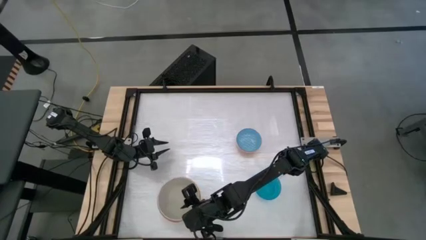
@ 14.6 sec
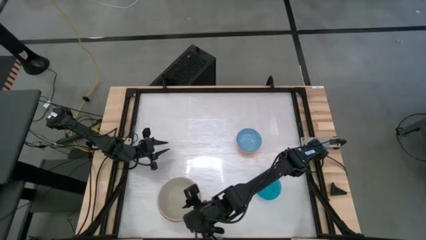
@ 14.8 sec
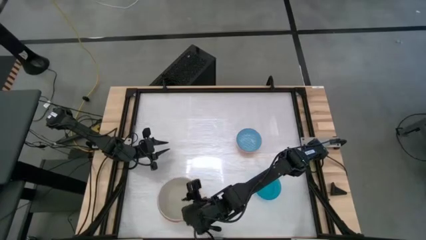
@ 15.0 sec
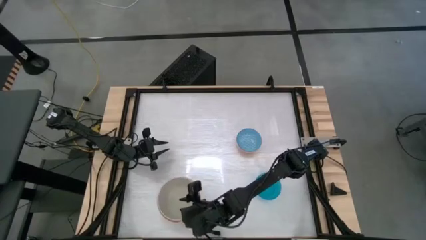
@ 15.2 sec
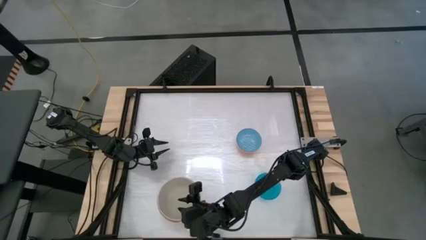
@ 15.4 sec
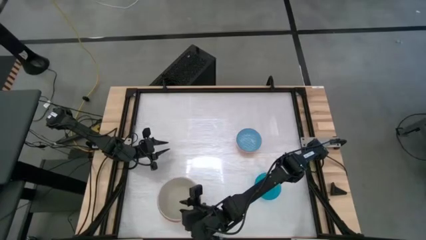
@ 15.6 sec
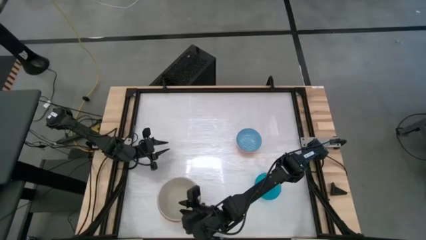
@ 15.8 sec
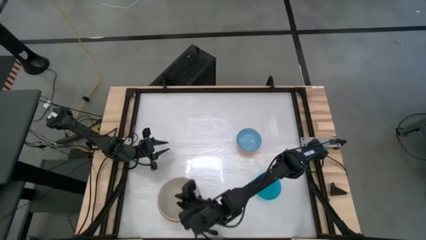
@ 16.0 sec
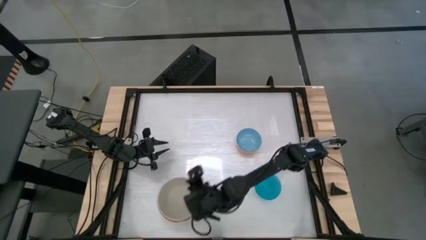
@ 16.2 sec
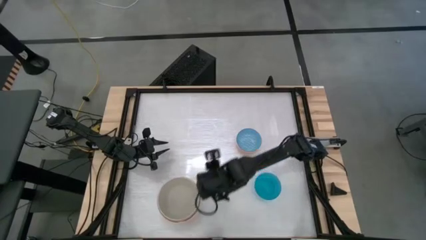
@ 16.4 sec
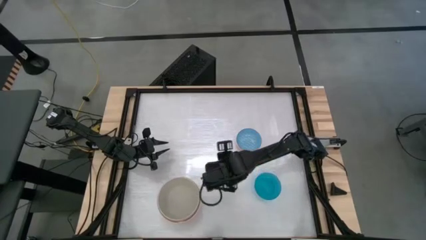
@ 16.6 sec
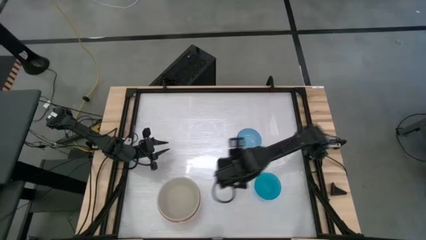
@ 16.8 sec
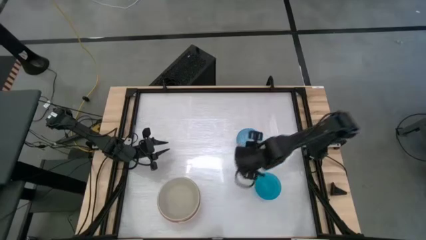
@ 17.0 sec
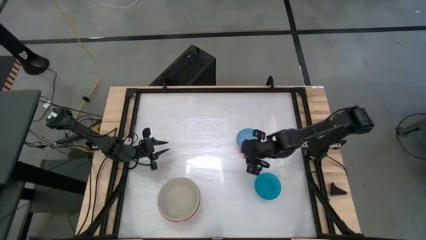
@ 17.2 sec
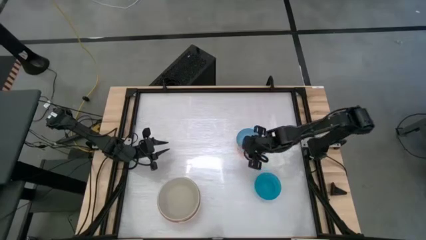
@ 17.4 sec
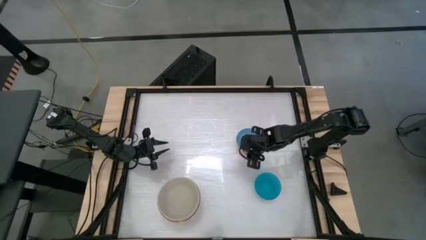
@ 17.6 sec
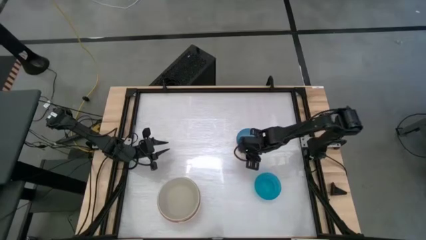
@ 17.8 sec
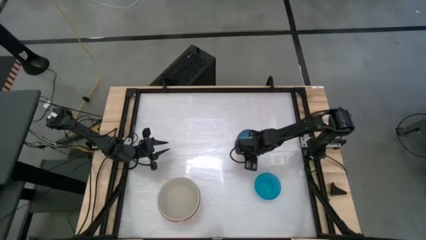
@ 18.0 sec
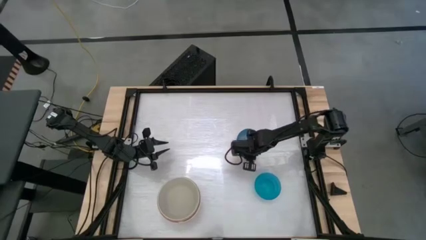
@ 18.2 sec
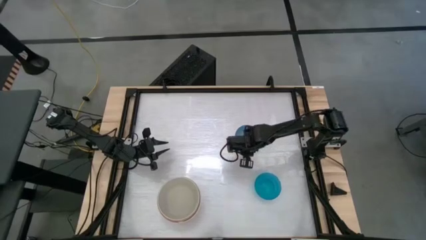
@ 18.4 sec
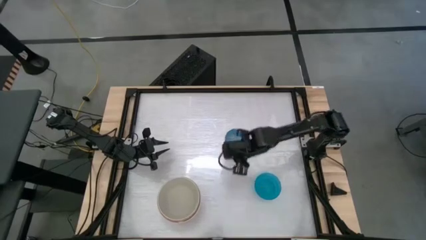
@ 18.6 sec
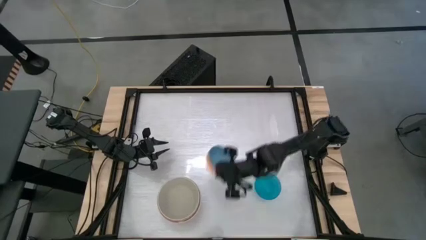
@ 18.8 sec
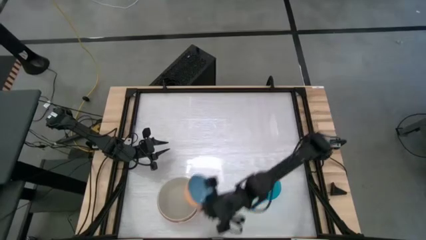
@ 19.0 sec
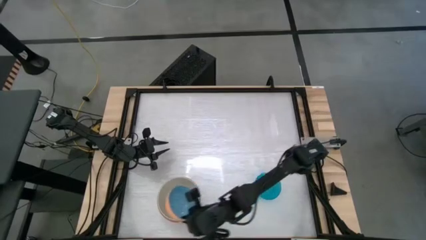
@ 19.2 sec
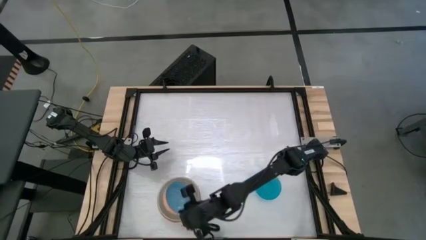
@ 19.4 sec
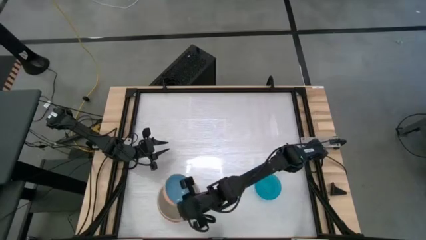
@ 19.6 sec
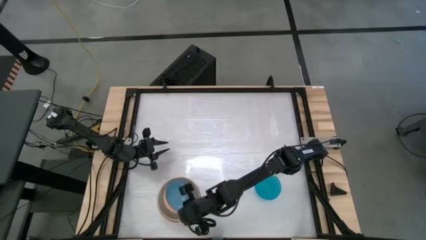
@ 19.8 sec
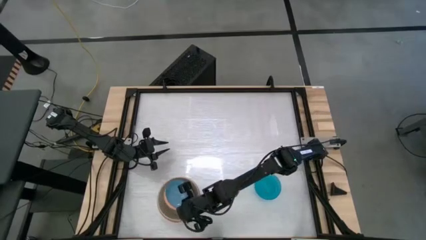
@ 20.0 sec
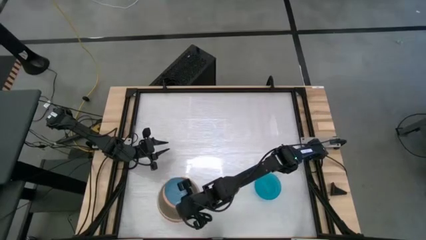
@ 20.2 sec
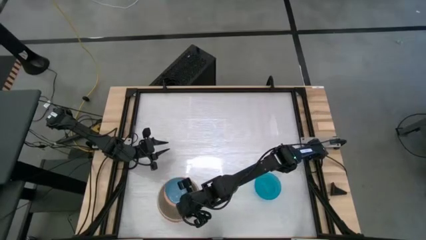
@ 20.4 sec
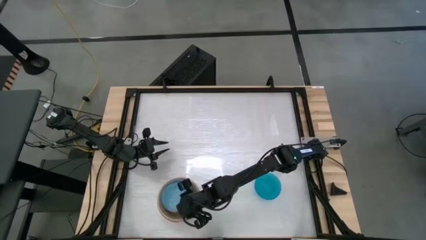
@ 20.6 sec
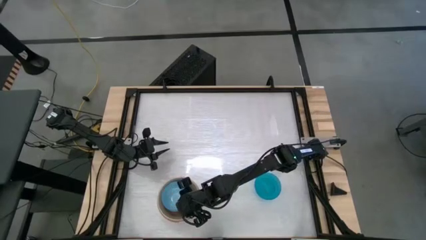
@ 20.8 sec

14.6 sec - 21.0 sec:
Stack the orange bowl on top of the gray bowl

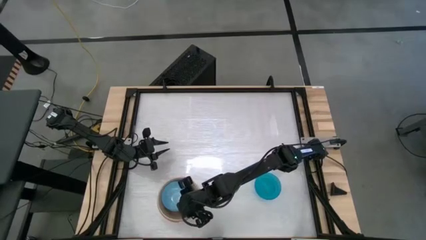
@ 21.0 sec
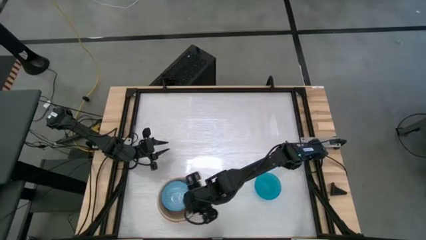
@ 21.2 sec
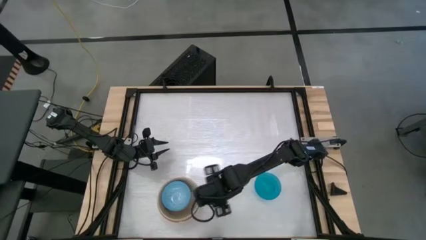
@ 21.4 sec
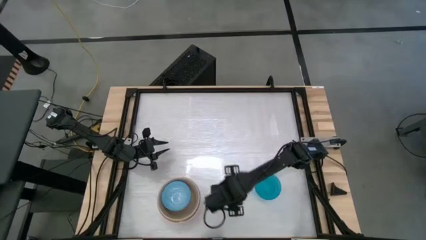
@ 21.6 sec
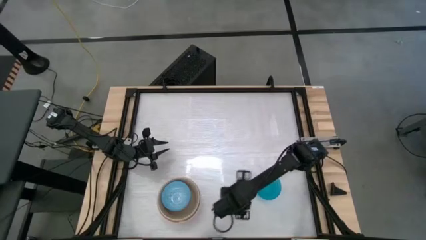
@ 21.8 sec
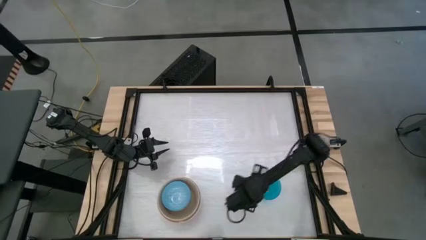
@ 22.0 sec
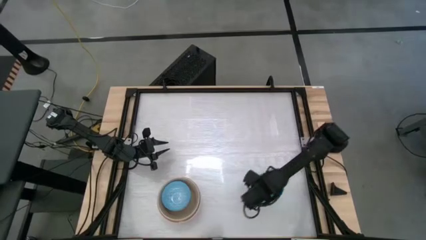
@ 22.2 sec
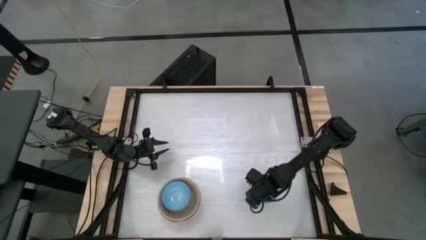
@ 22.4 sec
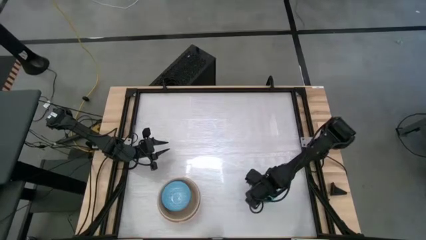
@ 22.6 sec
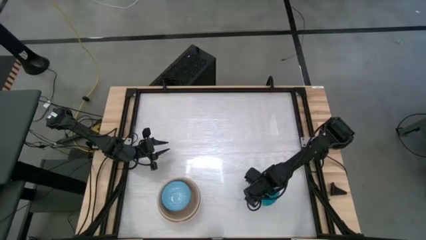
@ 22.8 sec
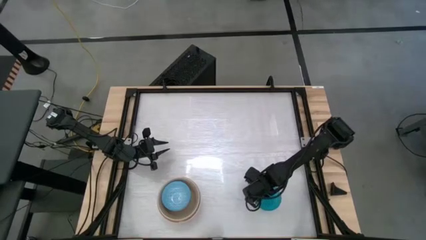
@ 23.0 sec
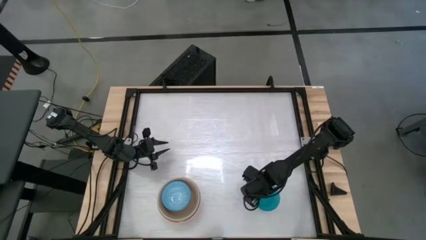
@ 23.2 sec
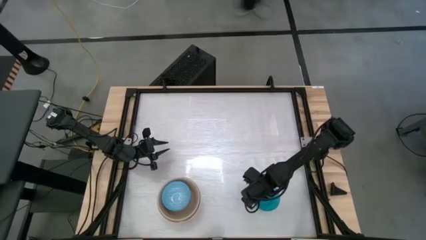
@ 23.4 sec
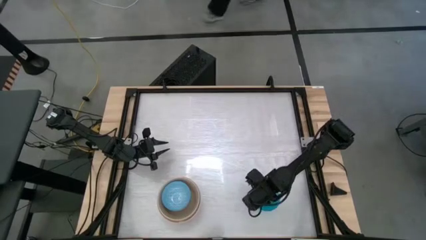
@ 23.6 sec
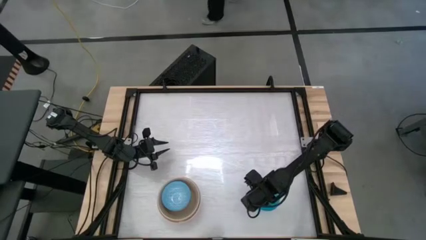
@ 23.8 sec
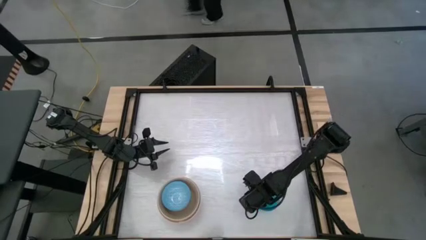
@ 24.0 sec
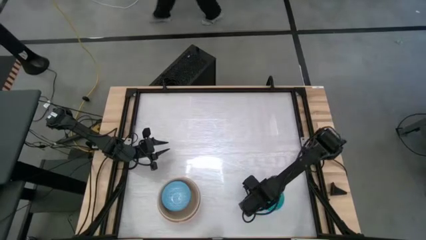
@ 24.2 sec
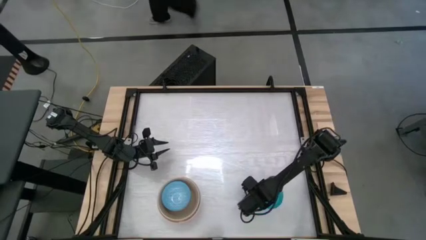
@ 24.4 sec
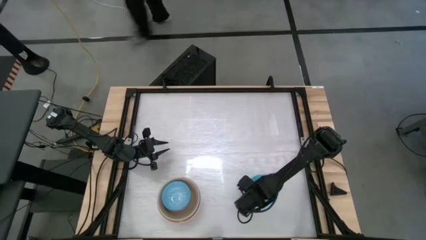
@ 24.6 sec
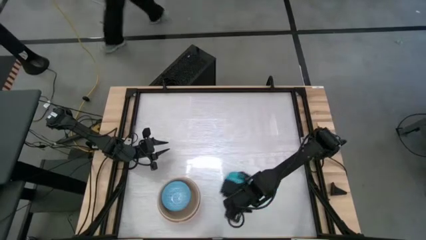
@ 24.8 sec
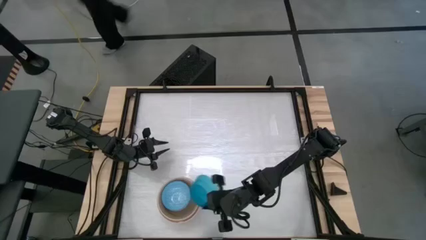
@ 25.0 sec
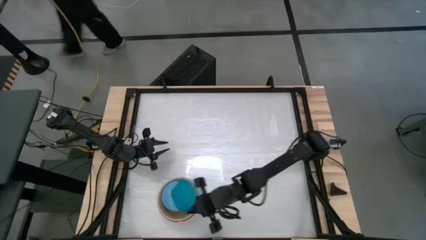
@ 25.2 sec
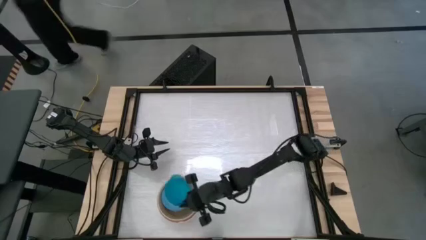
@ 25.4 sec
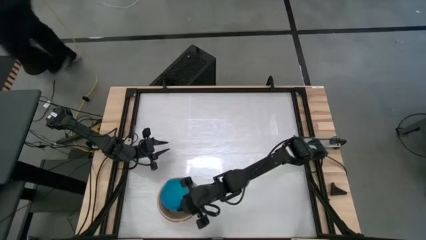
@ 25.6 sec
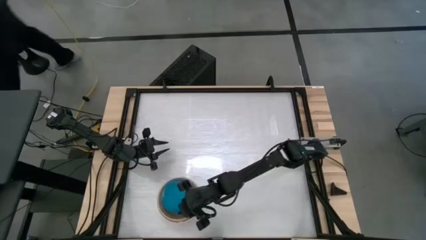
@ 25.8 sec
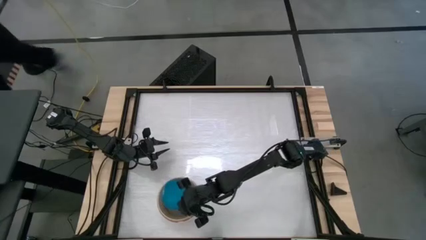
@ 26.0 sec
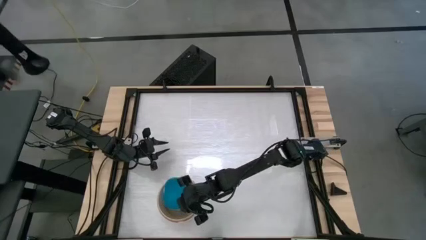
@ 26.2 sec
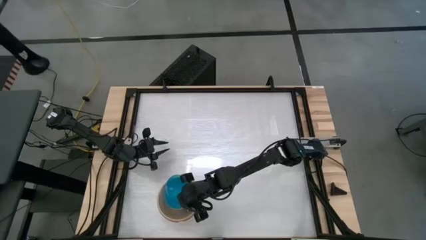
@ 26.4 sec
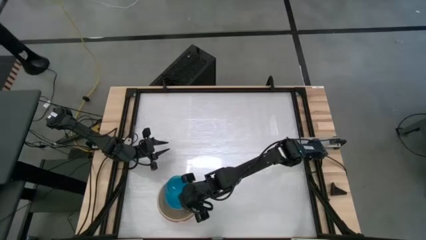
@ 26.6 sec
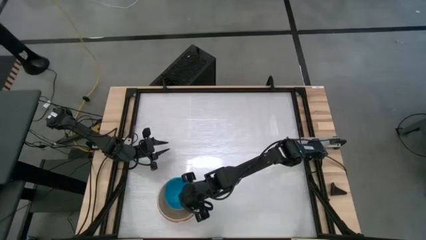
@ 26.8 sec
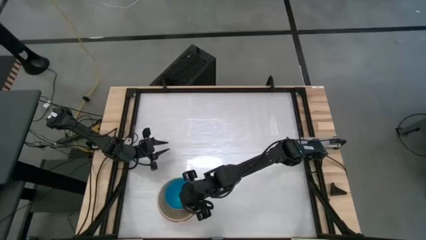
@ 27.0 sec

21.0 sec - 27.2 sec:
Stack the blue bowl on top of the orange bowl
